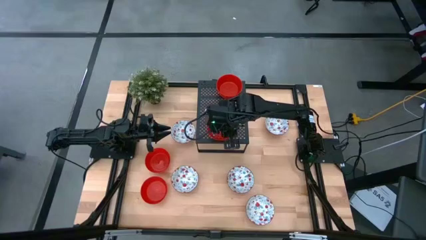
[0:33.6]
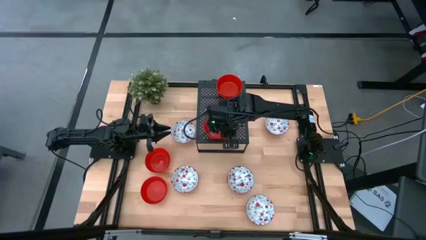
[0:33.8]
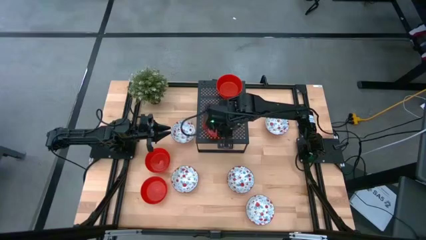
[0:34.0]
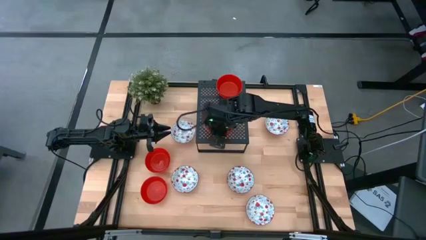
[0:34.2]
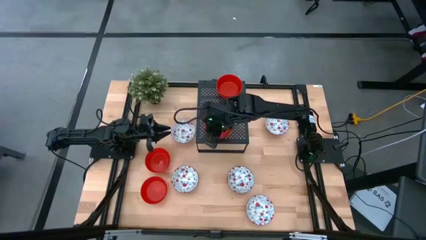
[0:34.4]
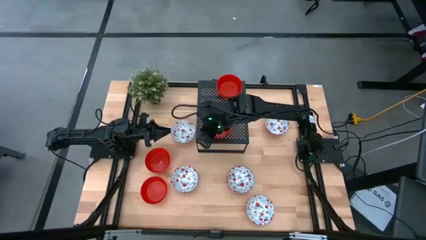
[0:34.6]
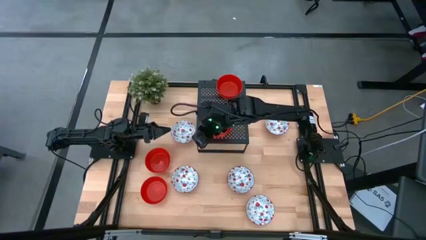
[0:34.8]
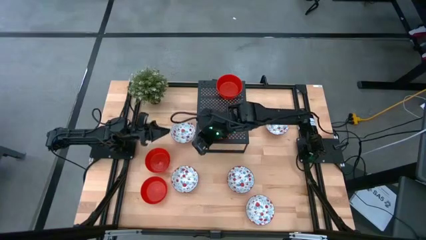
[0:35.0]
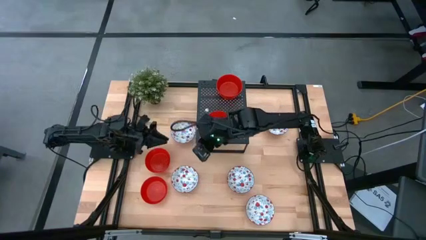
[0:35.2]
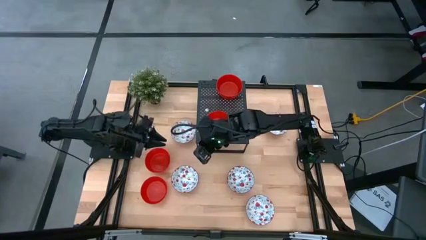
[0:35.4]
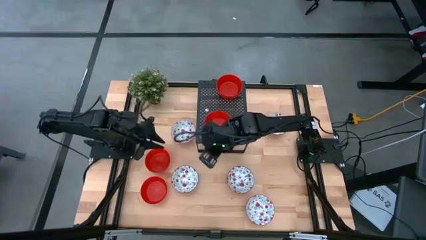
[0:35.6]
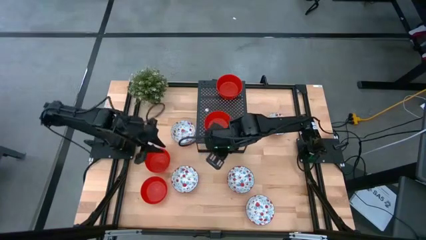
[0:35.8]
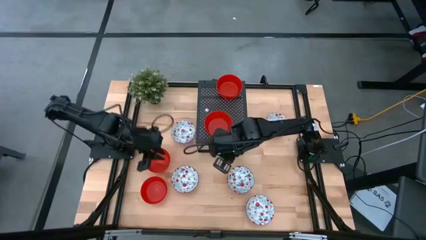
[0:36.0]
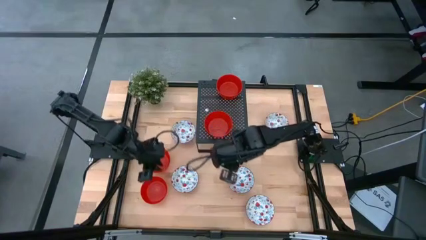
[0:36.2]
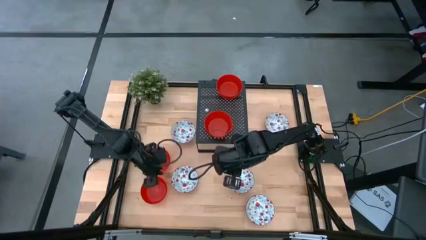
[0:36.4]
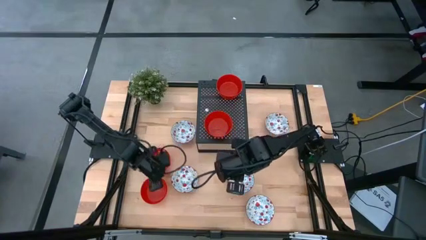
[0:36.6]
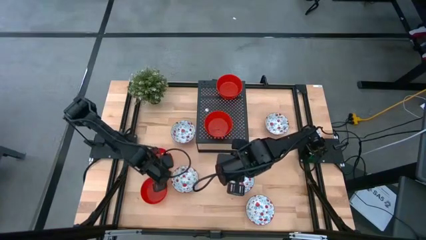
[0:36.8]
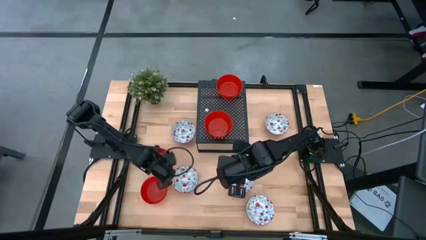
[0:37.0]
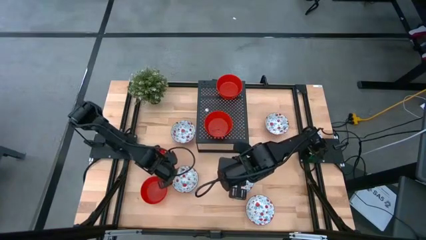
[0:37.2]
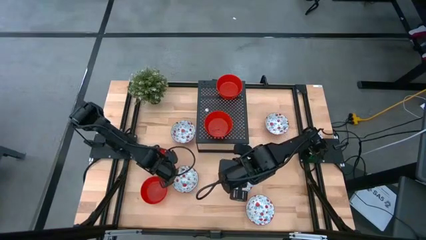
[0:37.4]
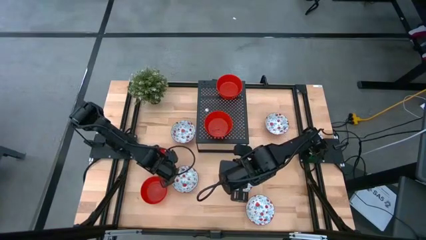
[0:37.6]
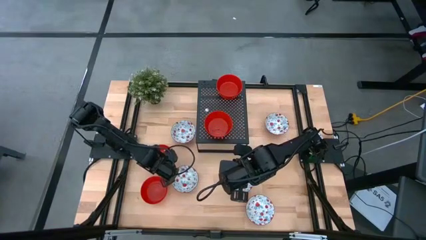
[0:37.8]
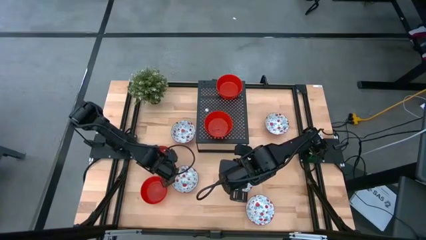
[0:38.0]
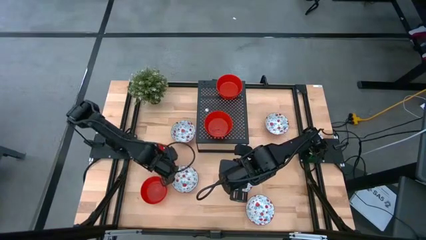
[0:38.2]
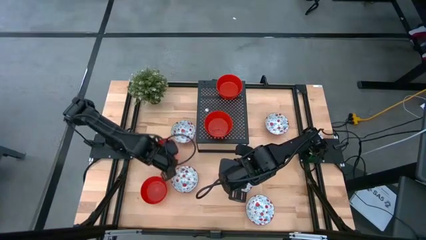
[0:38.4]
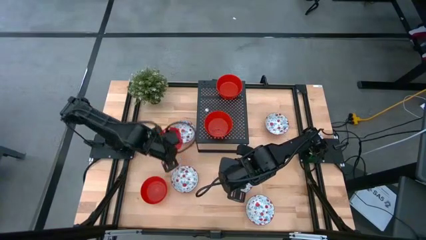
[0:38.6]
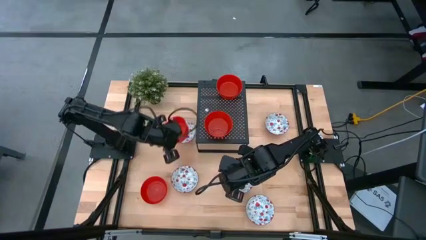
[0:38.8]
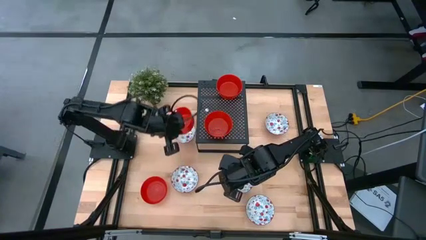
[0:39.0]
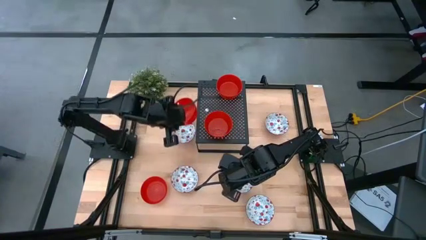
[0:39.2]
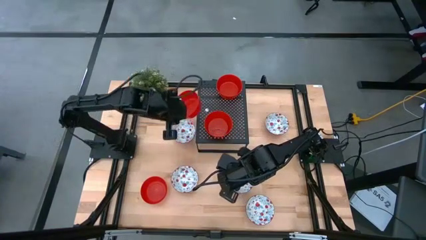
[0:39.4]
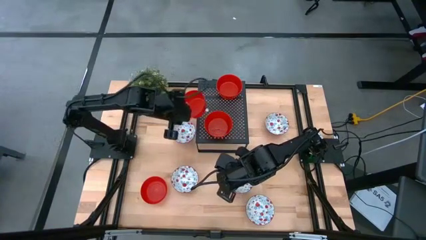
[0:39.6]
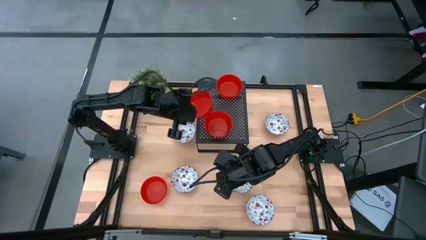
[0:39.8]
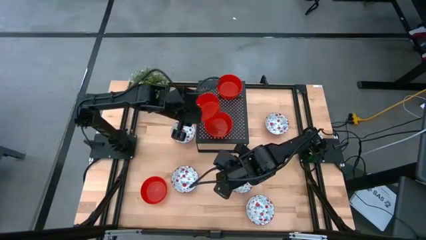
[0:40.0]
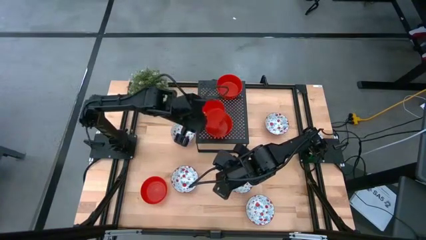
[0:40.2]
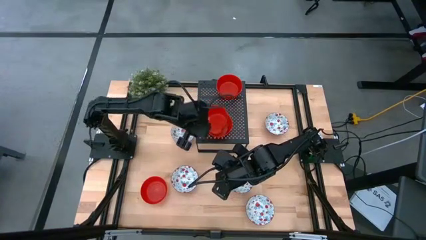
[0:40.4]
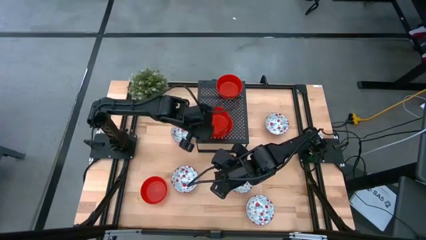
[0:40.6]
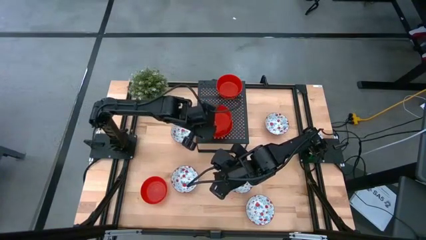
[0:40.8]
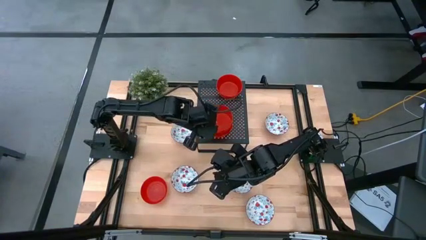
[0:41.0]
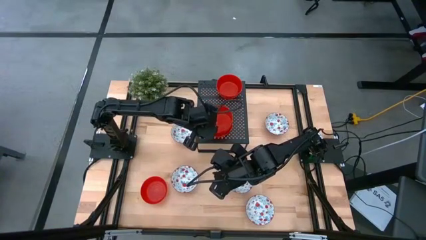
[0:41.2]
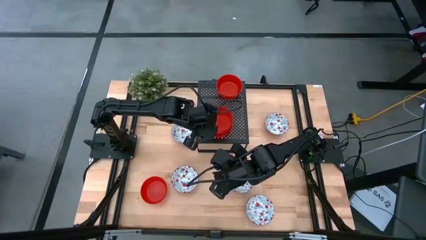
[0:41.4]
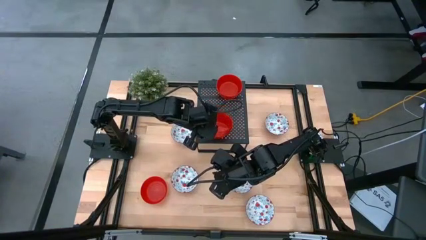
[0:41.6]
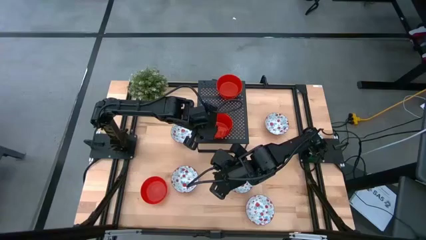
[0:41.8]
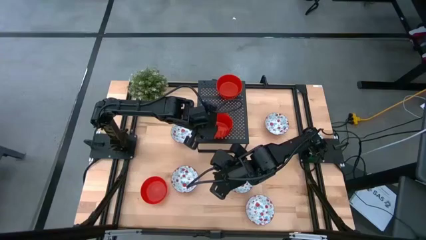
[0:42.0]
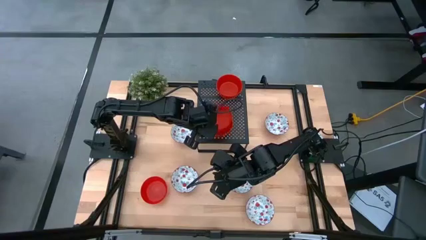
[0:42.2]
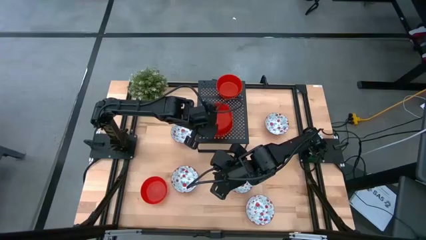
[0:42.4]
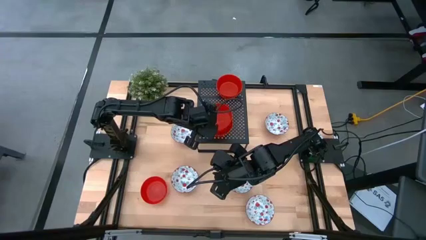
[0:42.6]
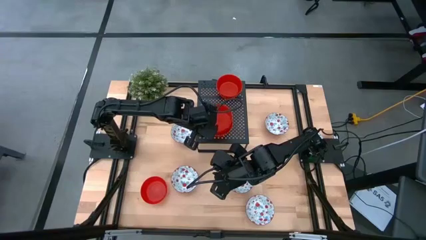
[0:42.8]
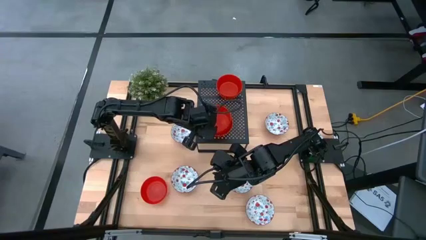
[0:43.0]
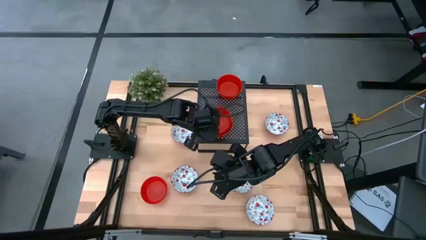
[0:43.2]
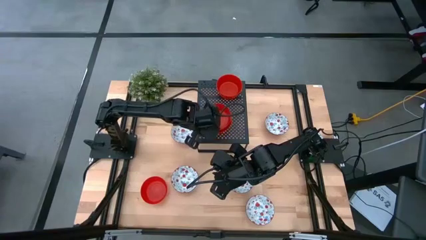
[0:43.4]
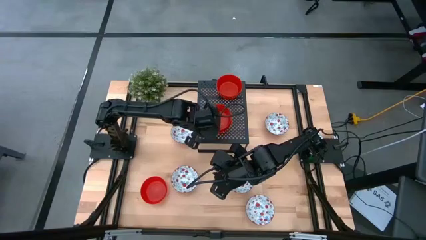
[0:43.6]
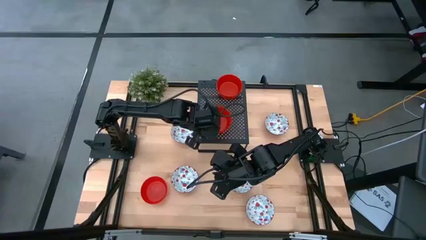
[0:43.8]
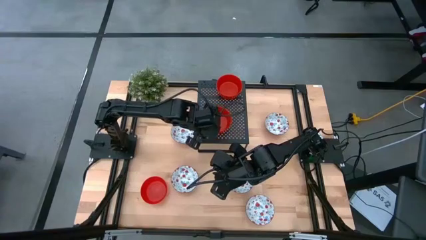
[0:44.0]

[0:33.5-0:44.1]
Task: Pick & Place Mini bowls
Stack the top red bowl on top of the other bottom red bowl on the shelf
